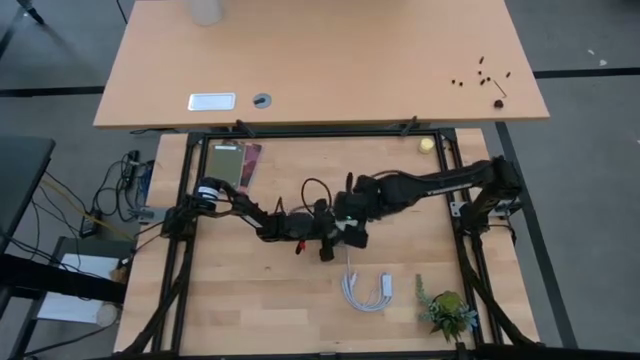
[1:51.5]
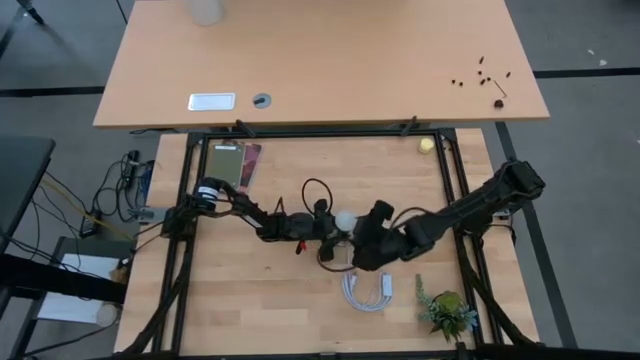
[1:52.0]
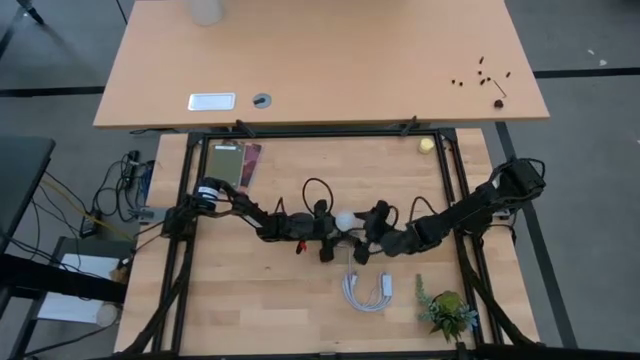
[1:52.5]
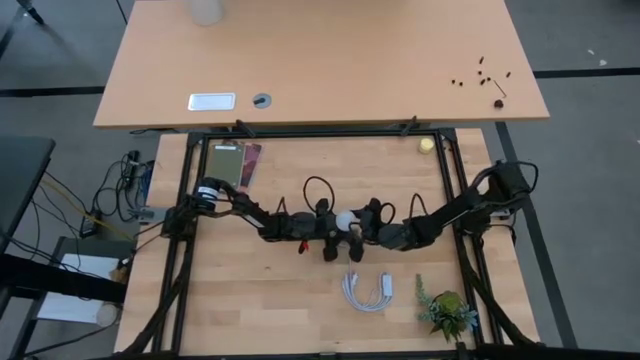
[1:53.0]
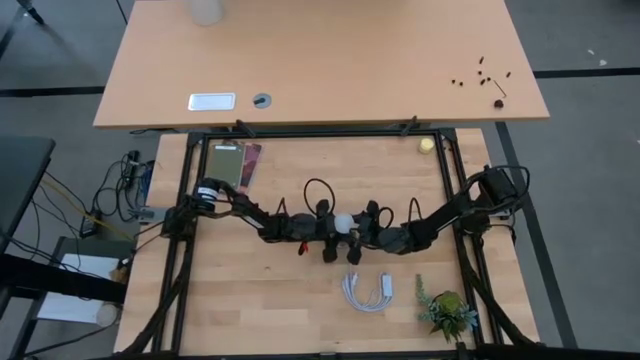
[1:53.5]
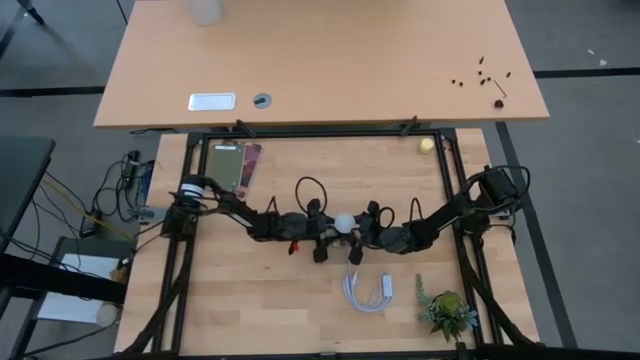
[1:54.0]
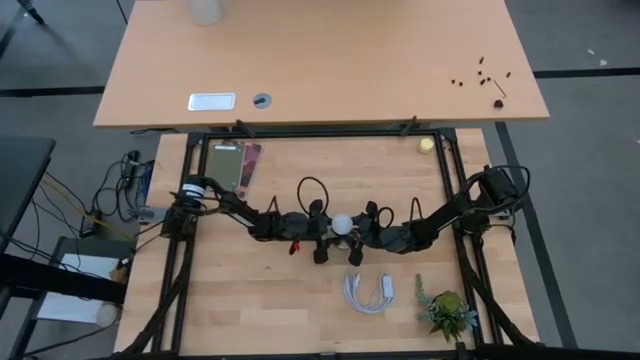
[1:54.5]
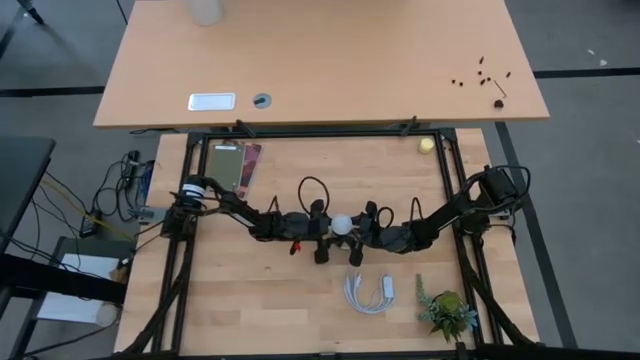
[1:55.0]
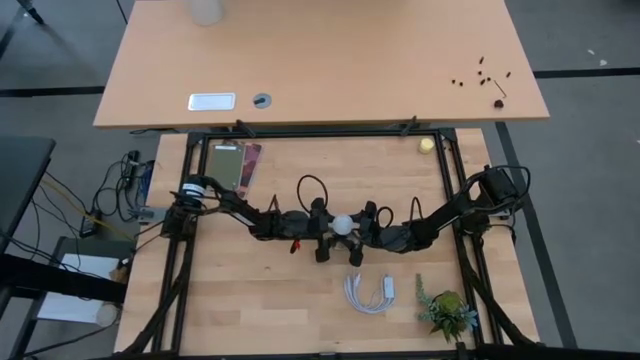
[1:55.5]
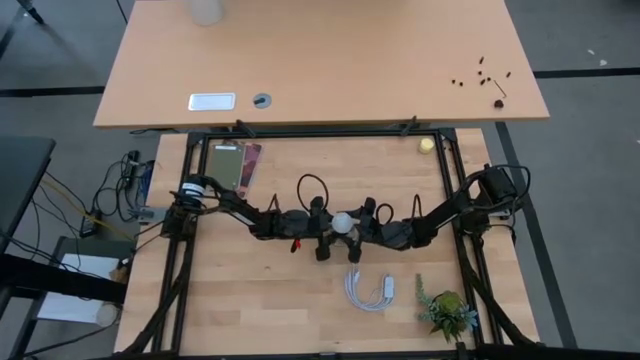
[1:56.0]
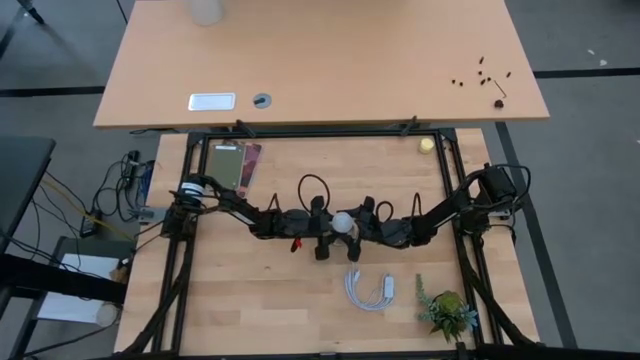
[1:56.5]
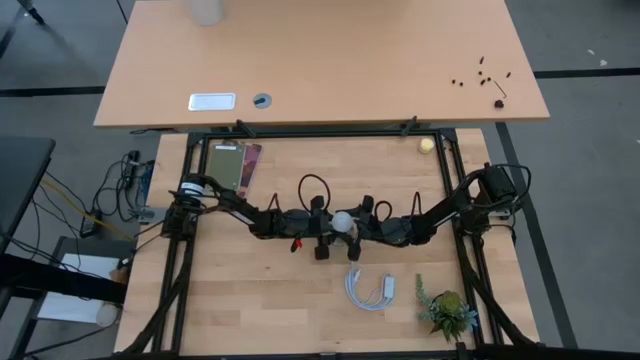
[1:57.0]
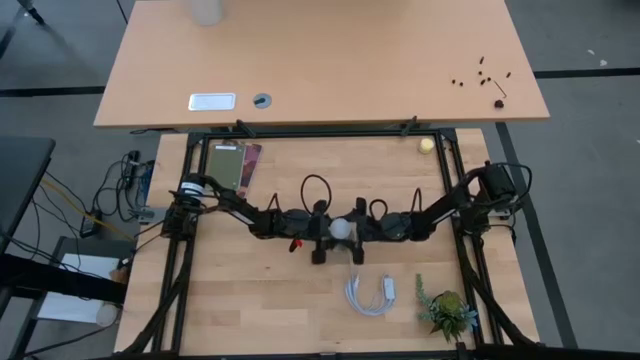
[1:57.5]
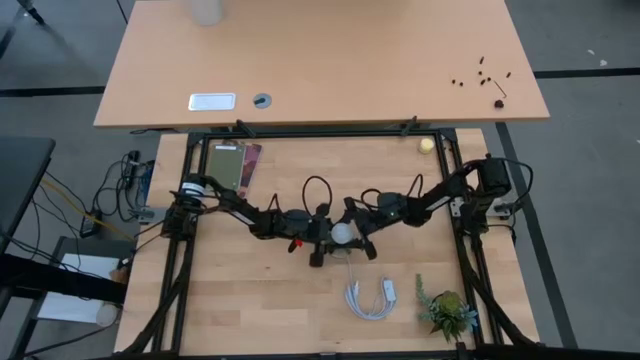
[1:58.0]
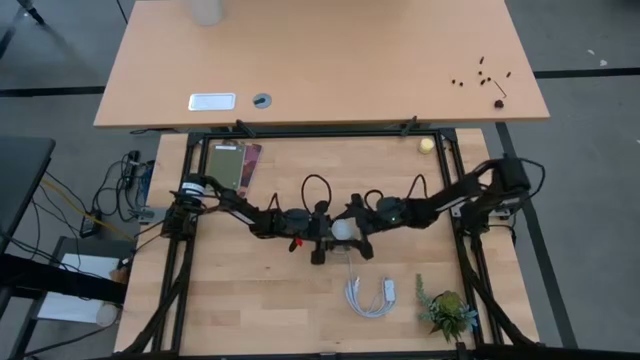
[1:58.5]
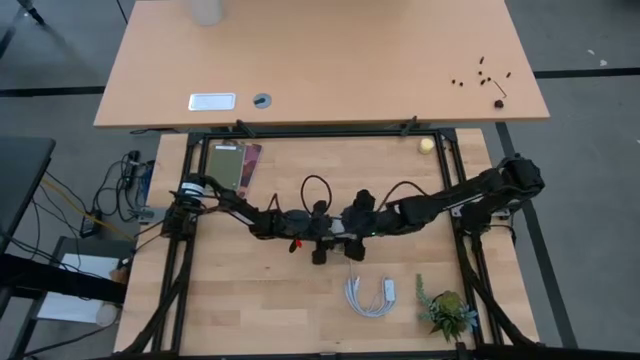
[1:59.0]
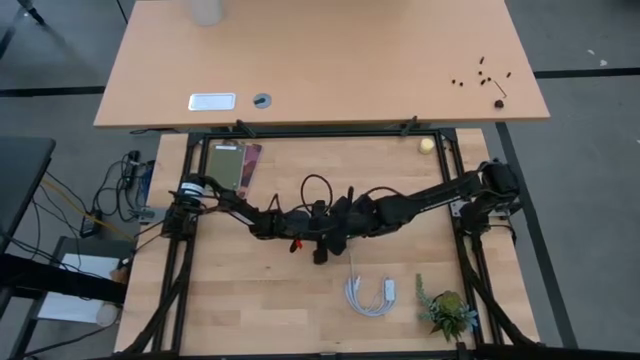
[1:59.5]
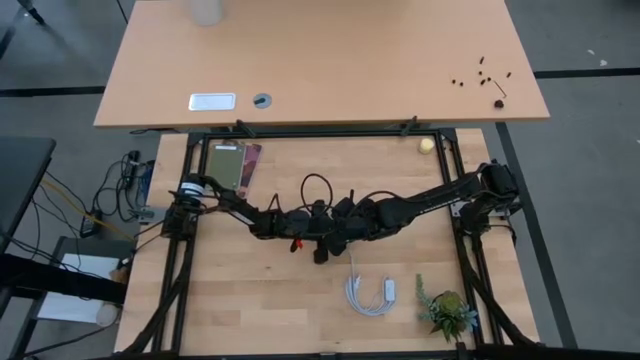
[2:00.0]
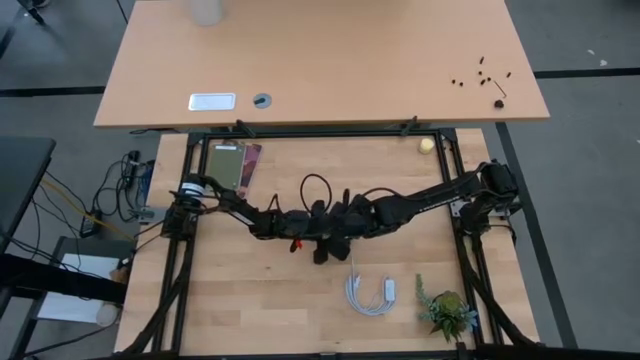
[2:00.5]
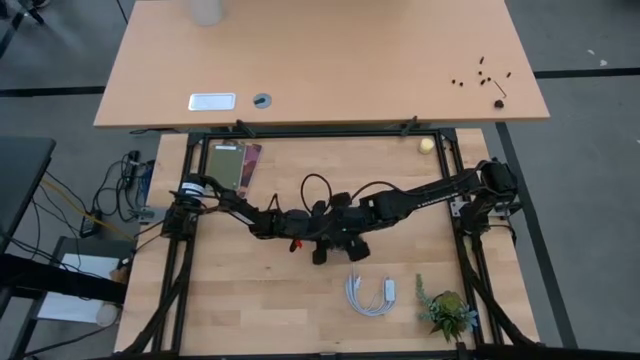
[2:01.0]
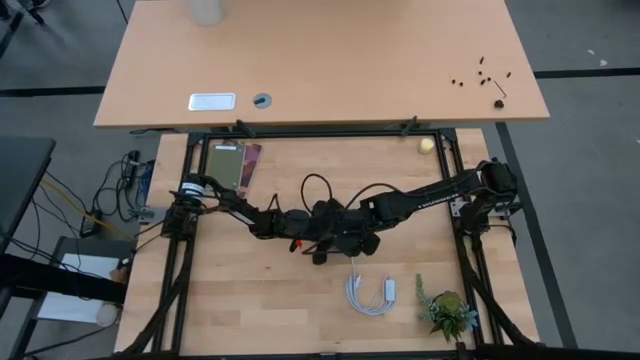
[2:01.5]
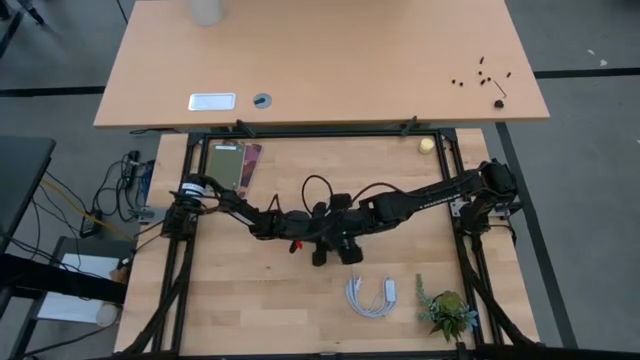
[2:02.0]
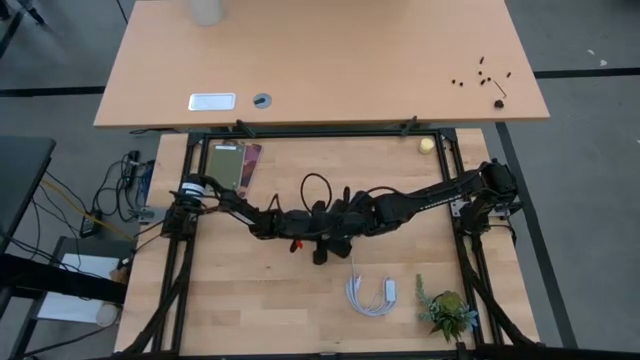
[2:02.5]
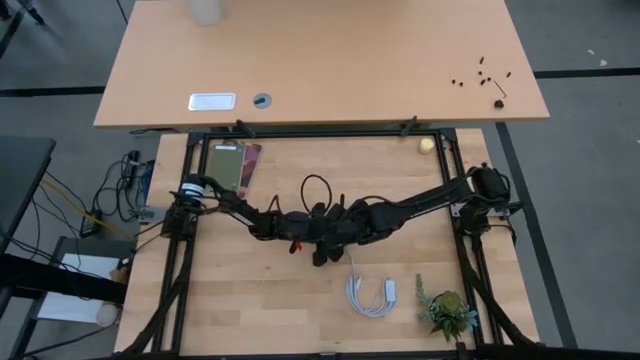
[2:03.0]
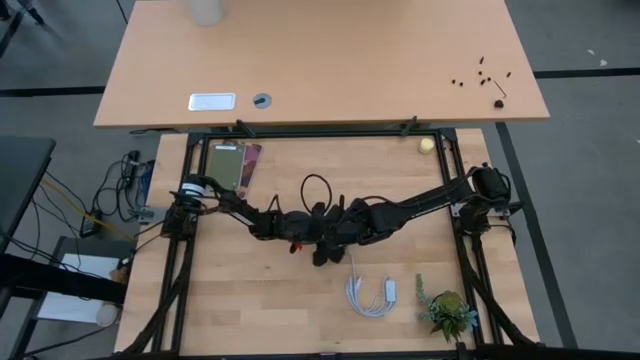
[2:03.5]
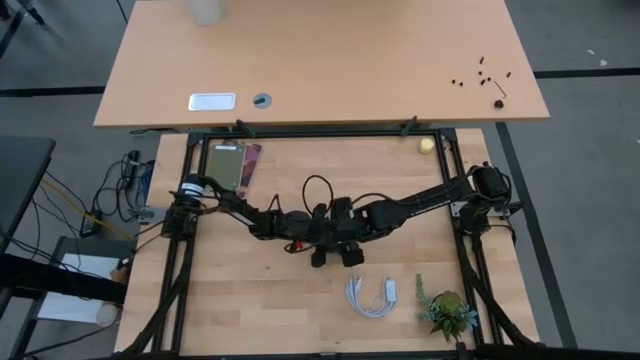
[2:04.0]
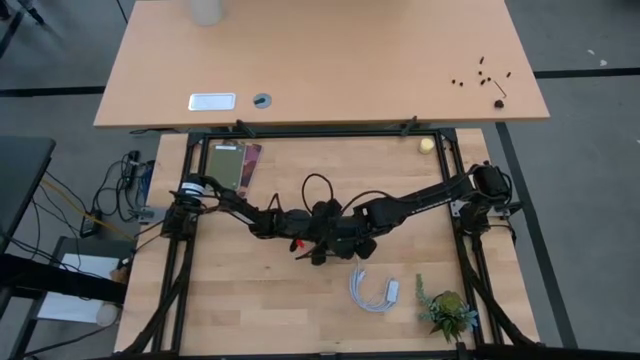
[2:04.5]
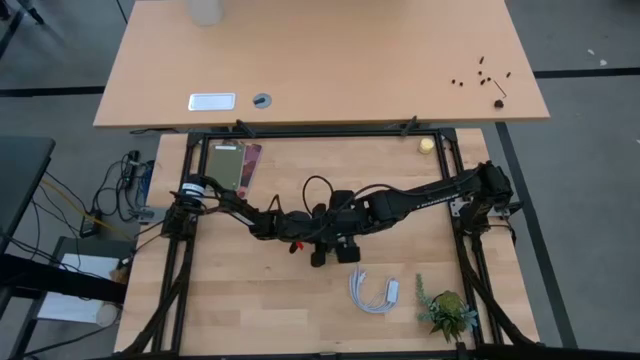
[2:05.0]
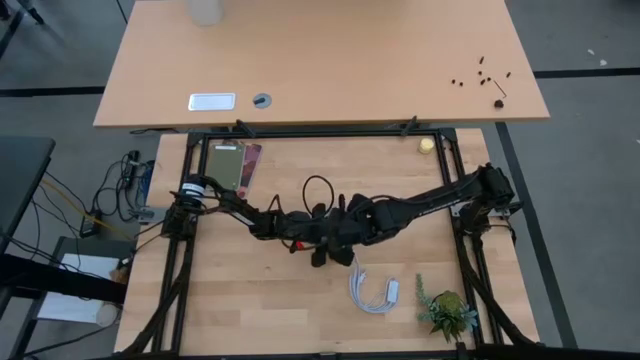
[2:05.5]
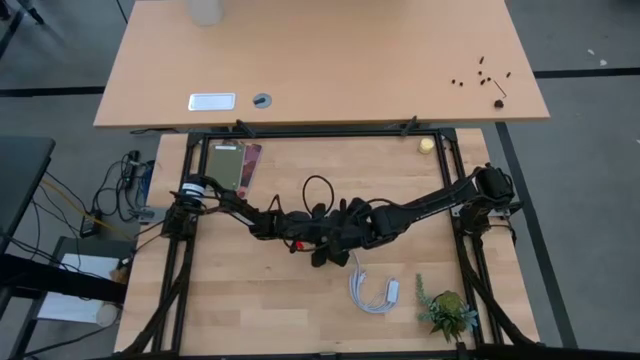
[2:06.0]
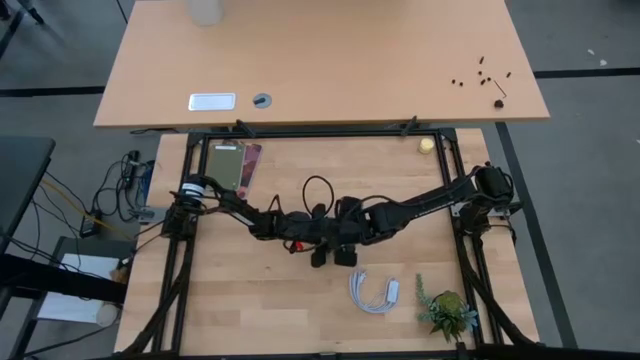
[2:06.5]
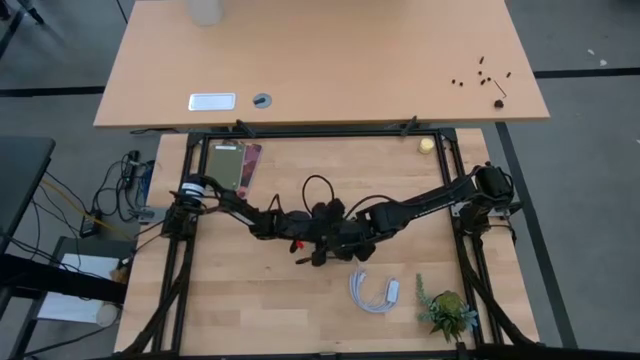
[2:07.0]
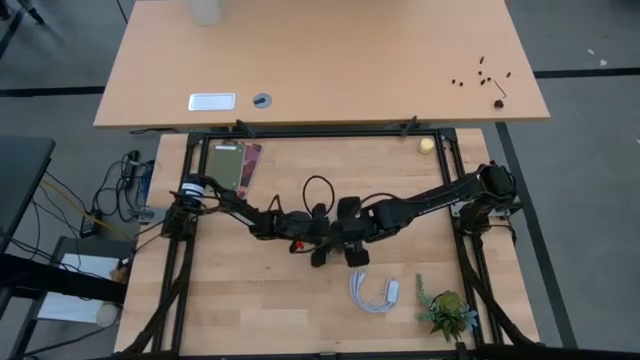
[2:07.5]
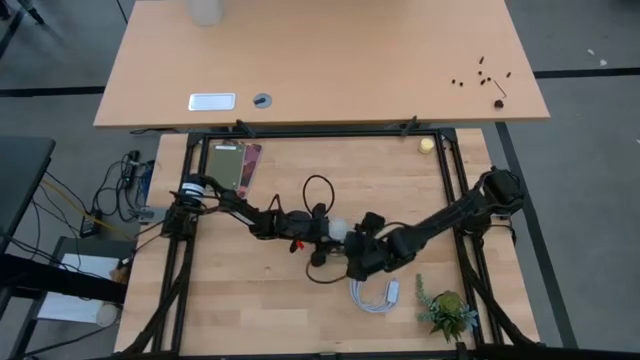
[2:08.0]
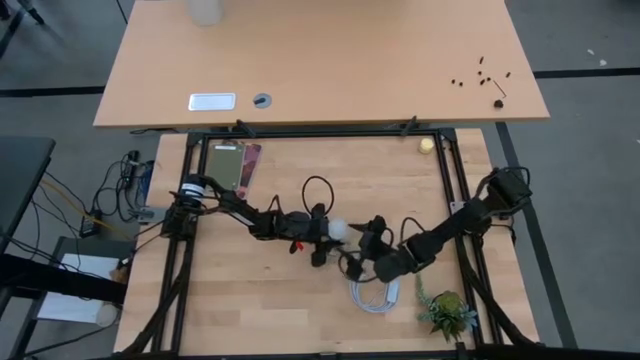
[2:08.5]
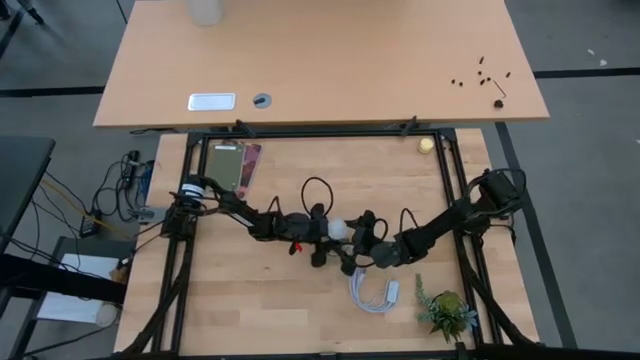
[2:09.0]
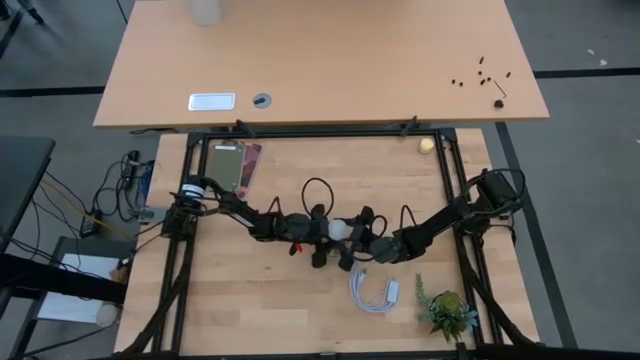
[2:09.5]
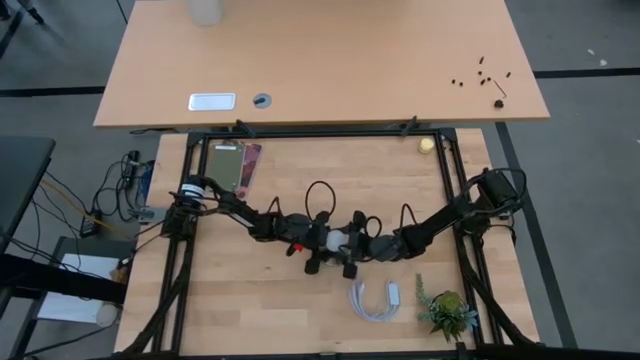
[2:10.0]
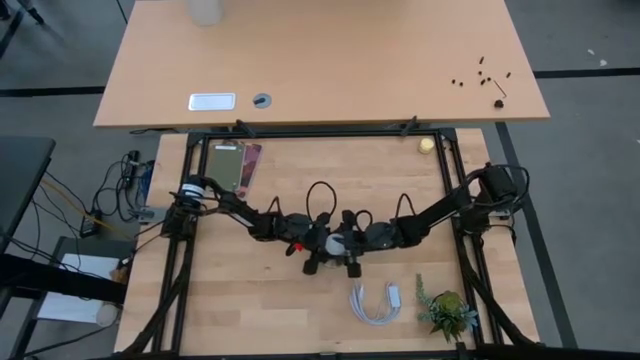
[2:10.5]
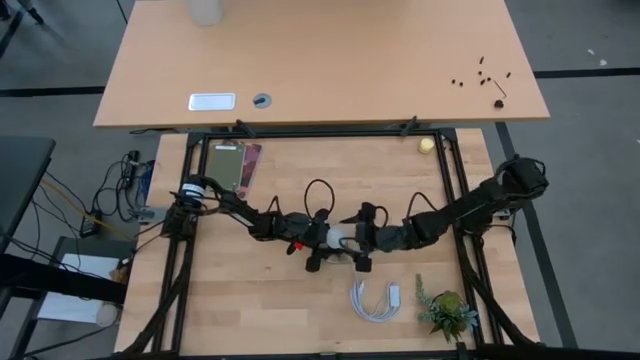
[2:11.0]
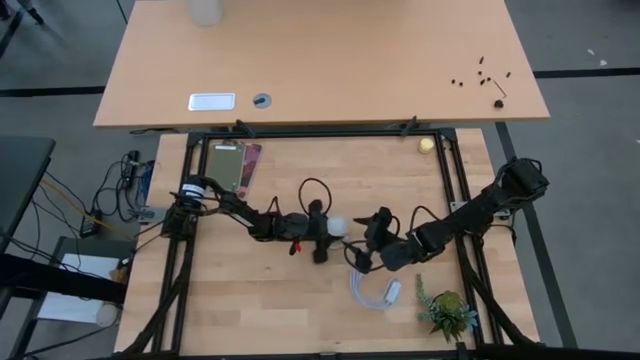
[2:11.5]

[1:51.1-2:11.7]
Task: Screw lightbulb
Remove the white lightbulb from the desk lamp

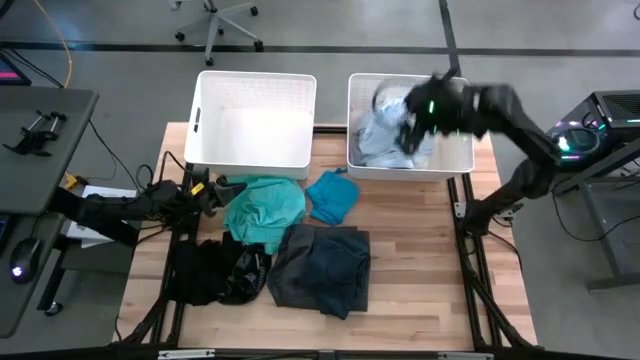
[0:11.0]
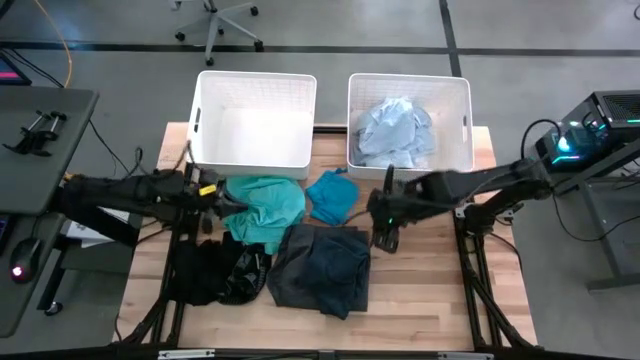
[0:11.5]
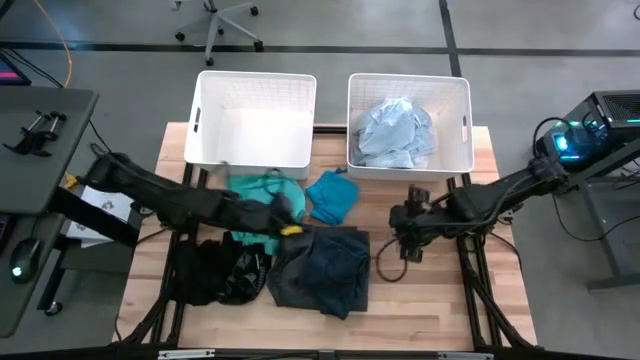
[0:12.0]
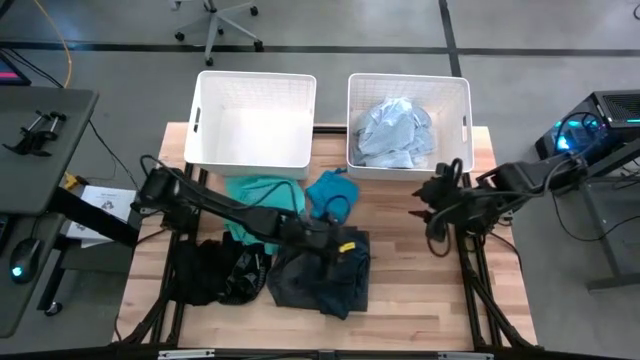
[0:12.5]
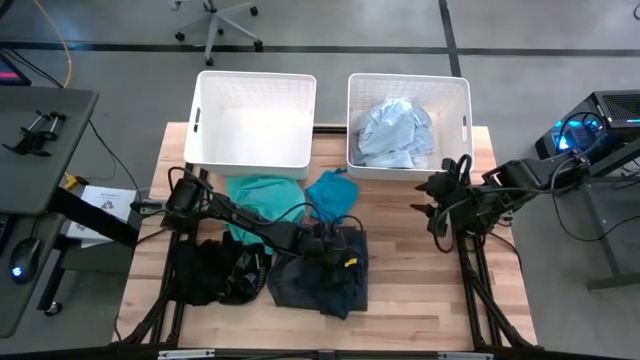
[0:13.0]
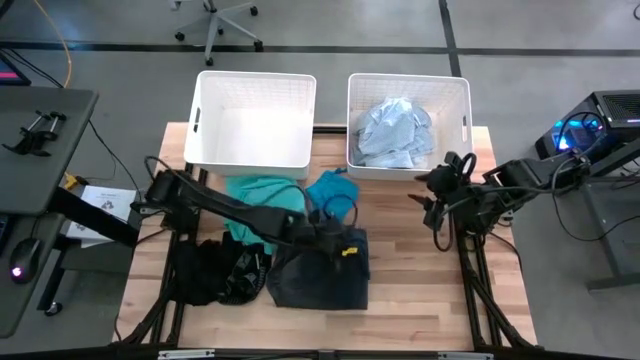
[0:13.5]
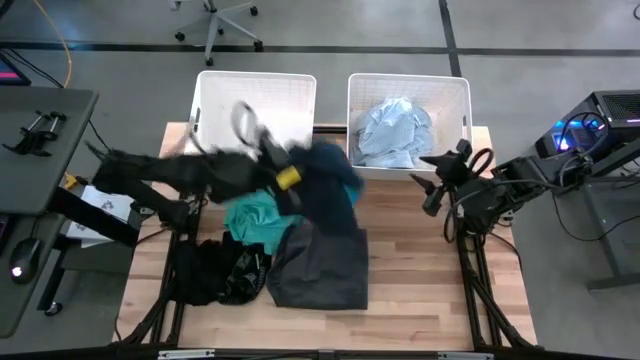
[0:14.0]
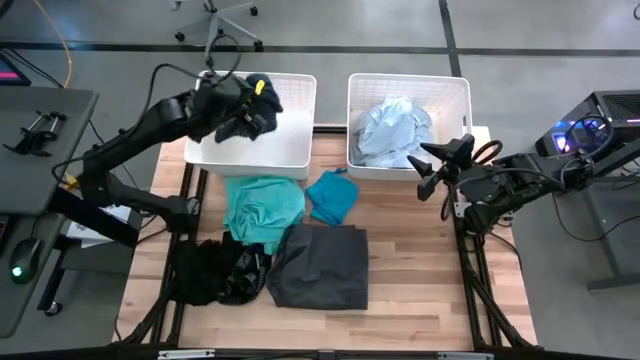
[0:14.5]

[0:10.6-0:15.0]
Task: Sort clothes
Put the navy blue sweatpants into the left white bin
